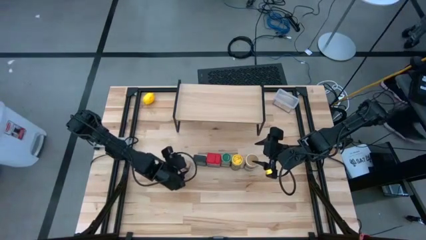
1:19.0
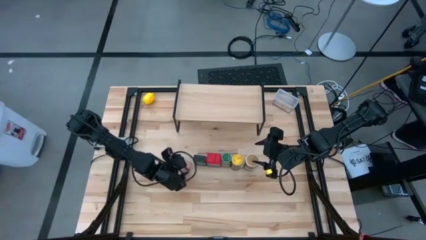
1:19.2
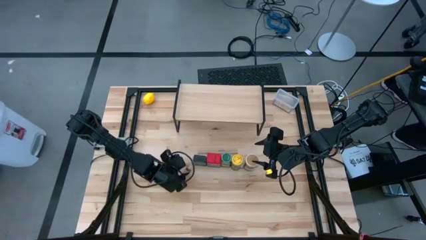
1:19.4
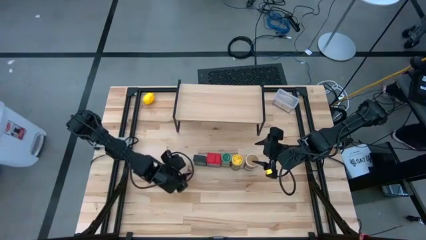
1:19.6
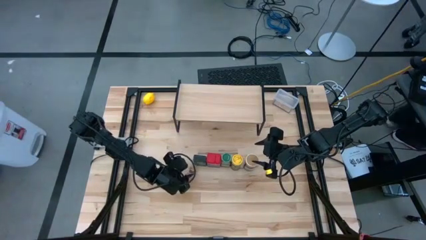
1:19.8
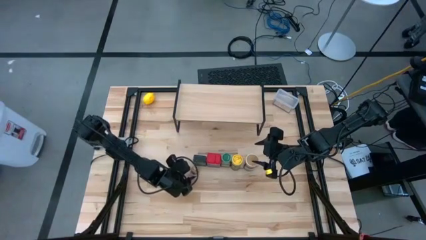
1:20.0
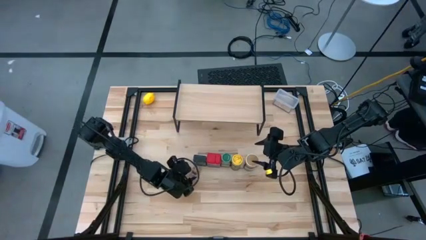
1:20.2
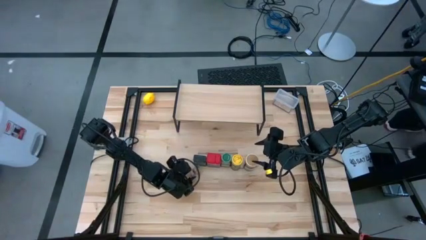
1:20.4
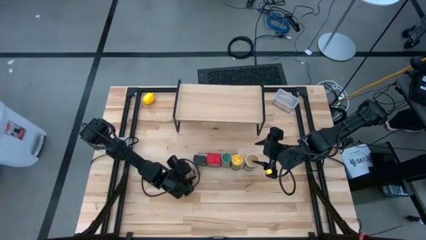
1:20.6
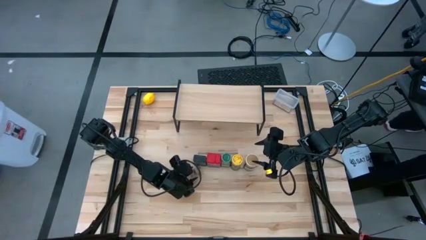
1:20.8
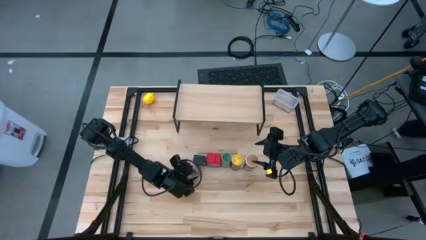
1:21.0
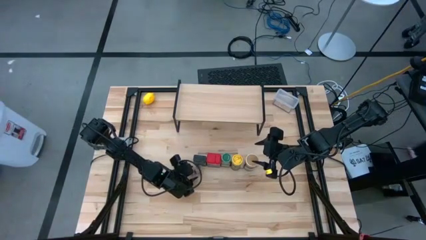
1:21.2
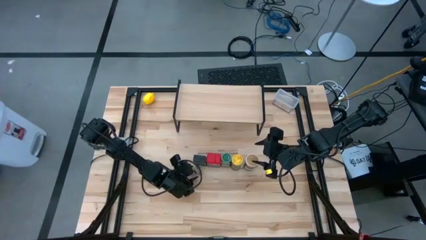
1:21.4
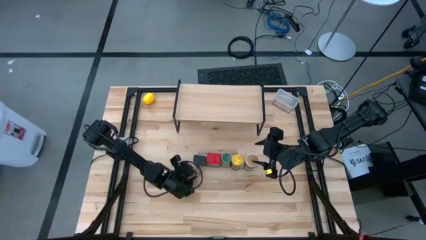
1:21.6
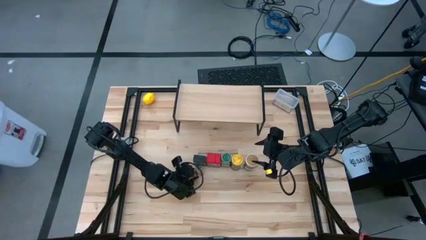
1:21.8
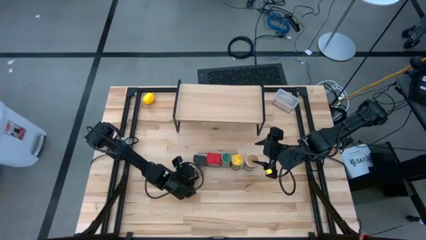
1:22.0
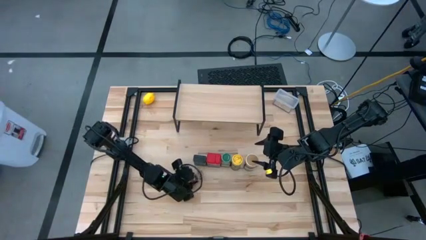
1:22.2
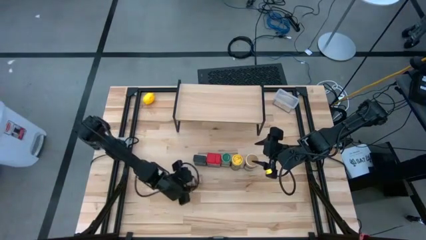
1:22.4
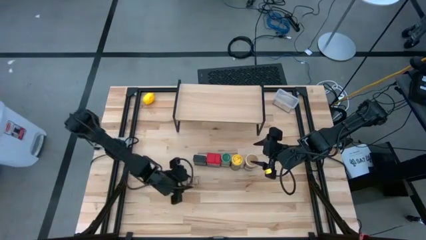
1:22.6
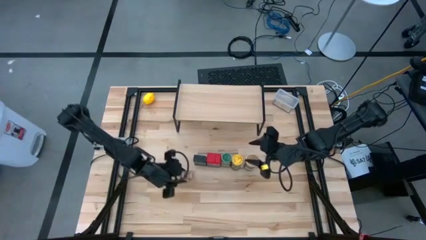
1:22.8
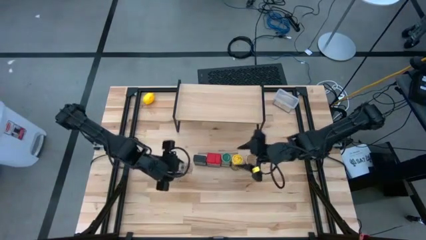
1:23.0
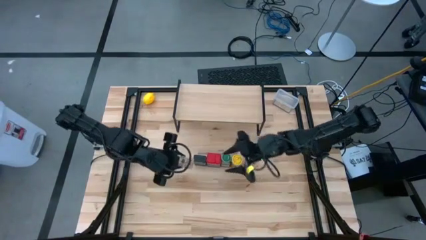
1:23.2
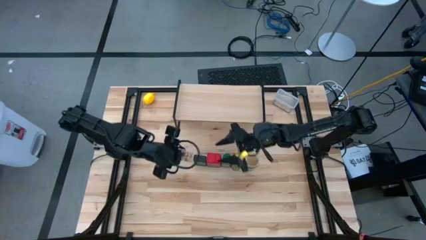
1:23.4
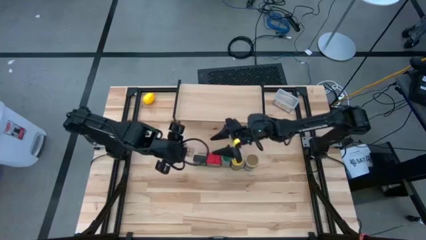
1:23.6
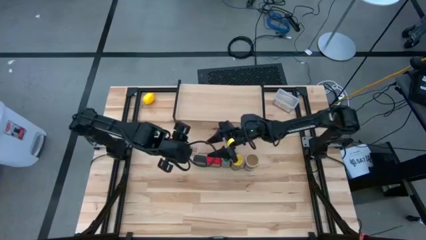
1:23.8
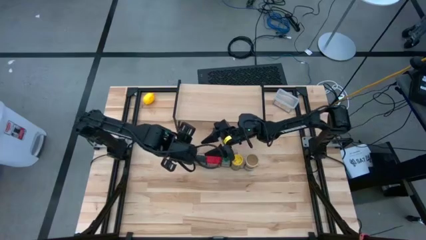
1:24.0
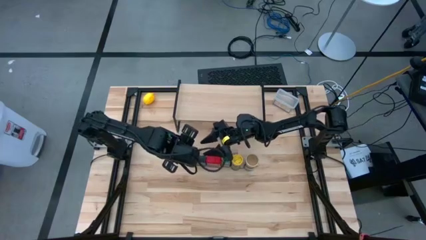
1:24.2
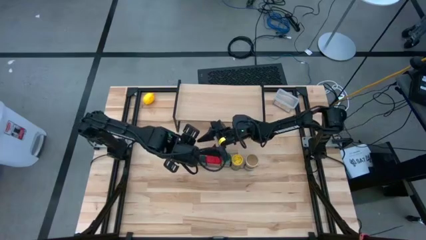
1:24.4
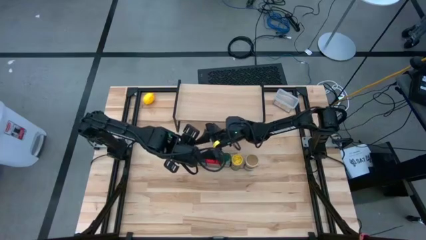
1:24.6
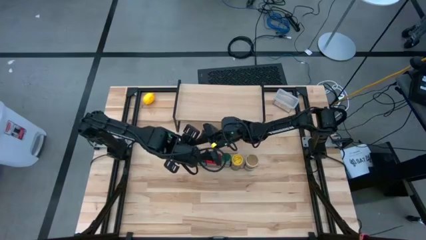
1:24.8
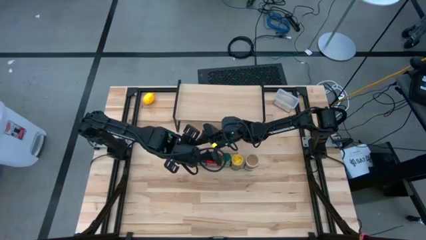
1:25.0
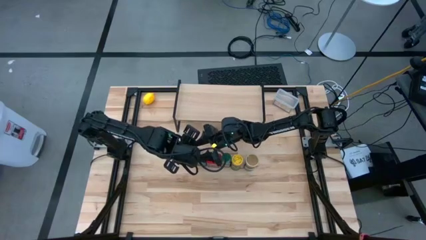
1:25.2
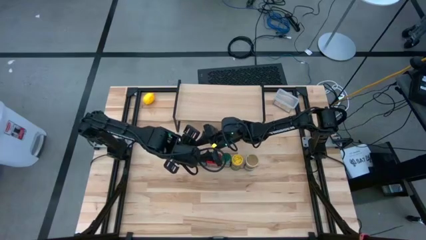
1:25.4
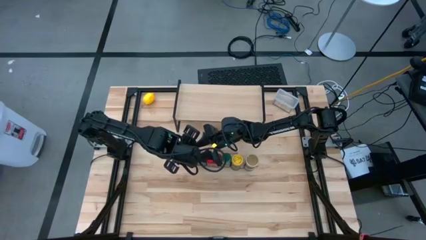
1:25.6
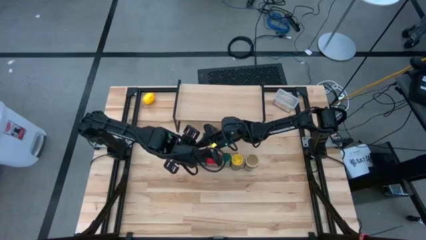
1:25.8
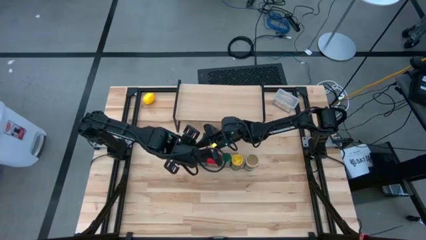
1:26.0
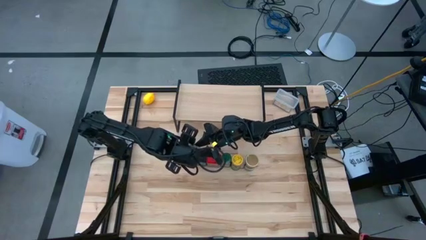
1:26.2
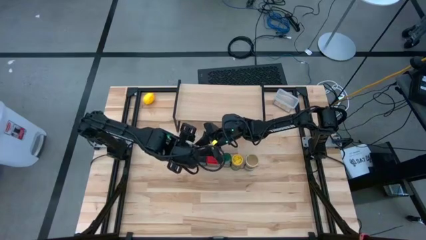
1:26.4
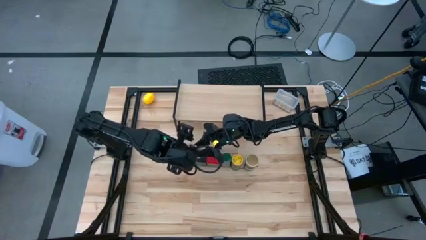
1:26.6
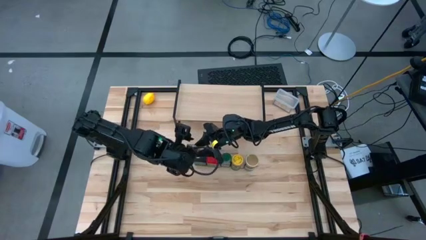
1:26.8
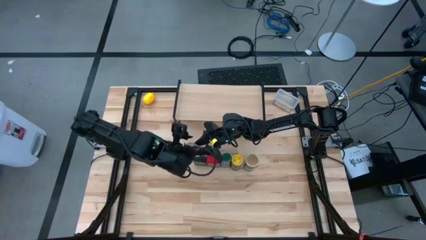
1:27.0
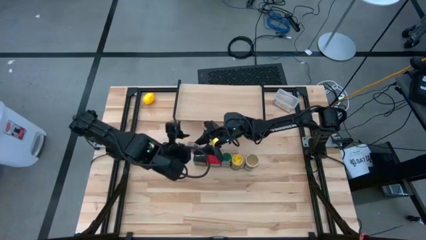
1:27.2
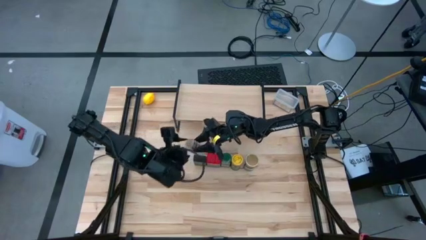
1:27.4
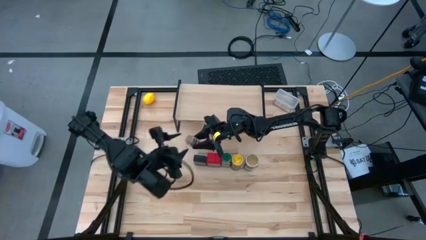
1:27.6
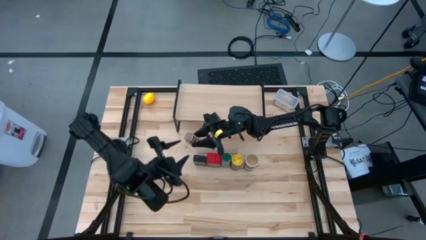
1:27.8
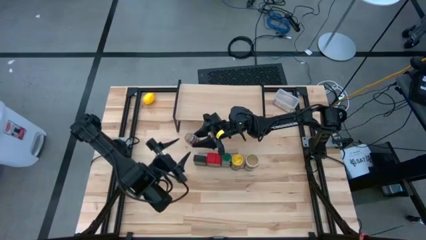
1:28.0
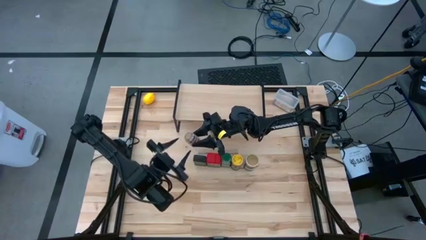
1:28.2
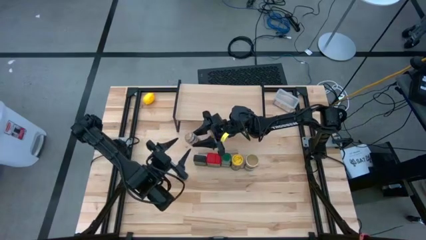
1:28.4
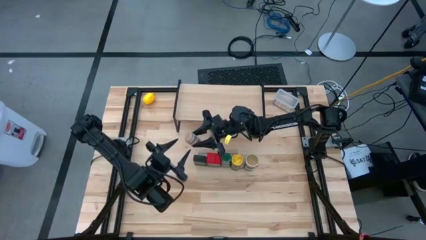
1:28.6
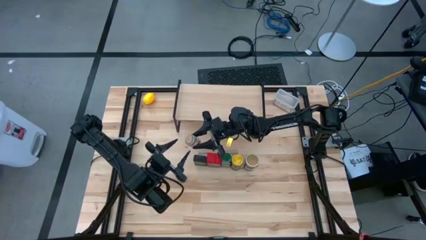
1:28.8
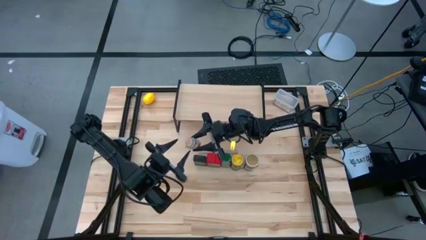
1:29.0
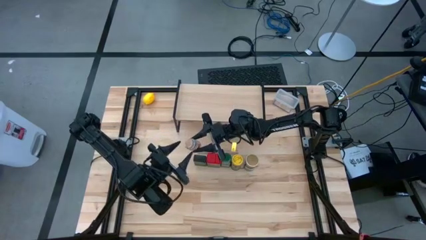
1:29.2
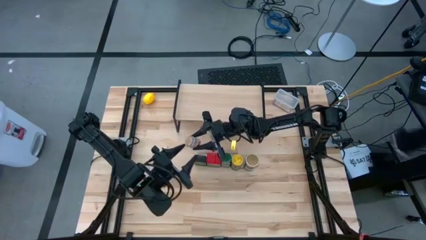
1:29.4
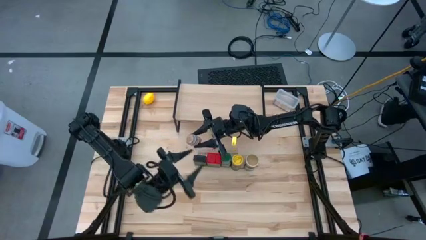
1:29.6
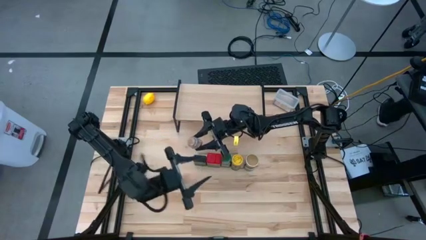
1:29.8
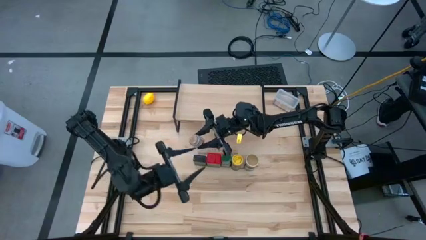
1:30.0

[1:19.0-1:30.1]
Task: Shelf spices
Put the transparent seasoning bottle on the shelf
